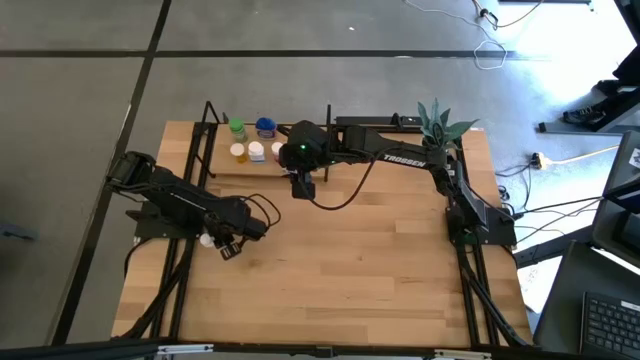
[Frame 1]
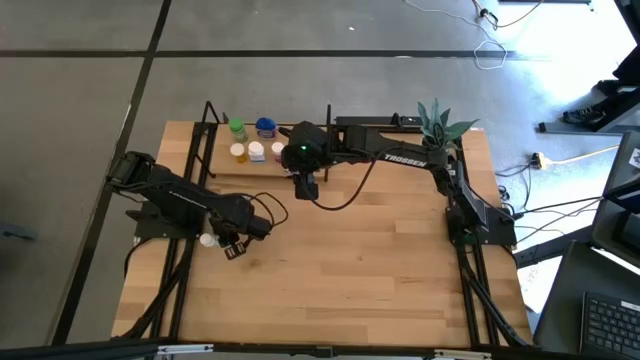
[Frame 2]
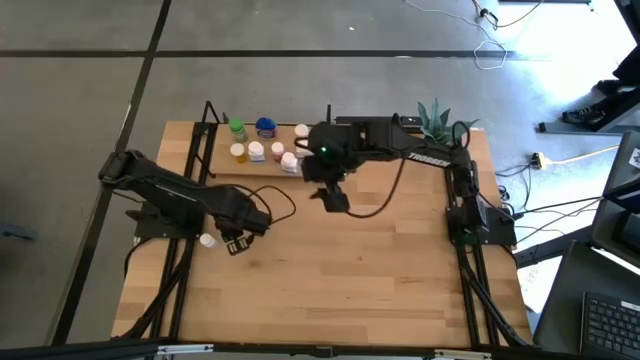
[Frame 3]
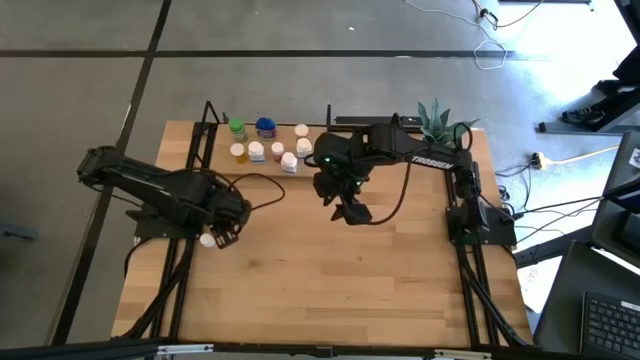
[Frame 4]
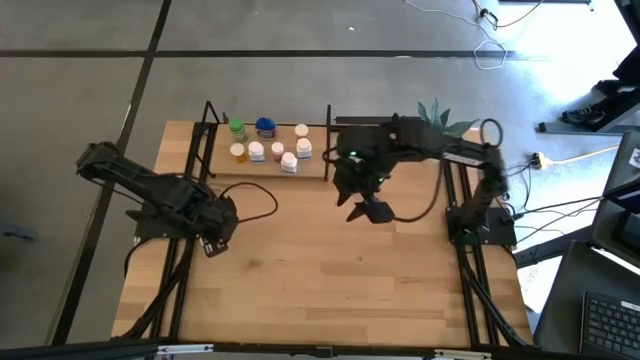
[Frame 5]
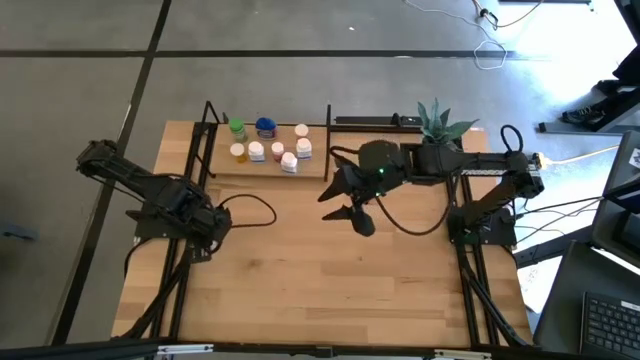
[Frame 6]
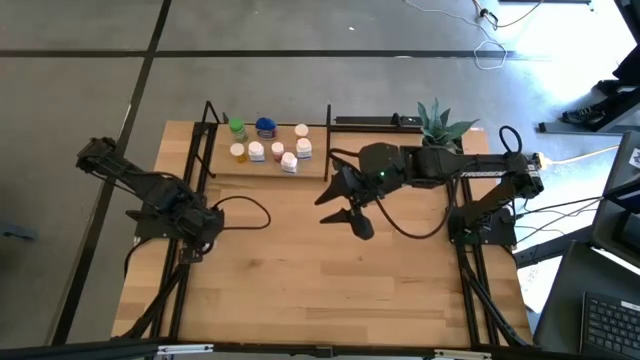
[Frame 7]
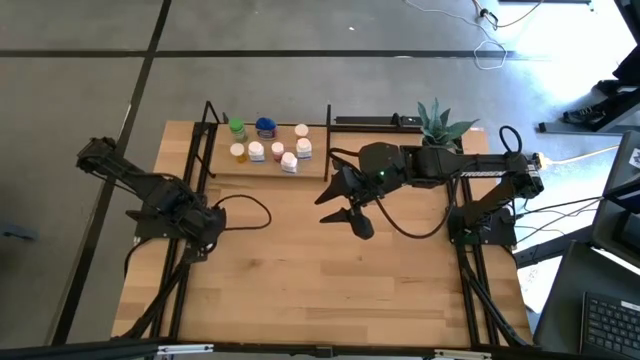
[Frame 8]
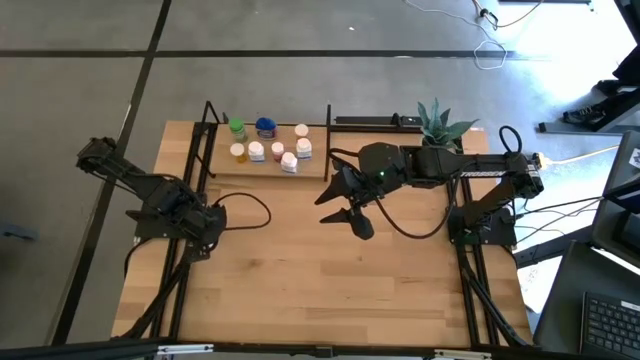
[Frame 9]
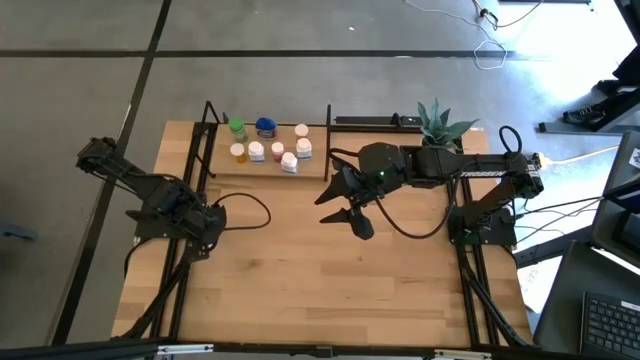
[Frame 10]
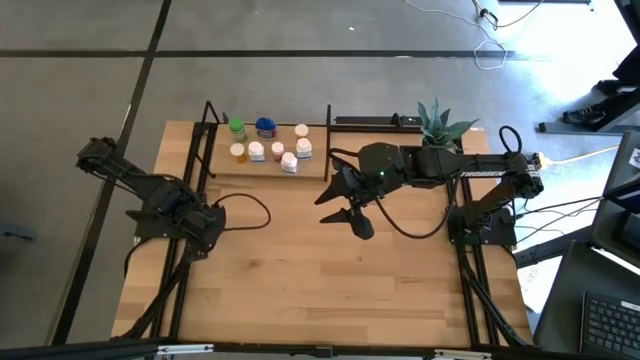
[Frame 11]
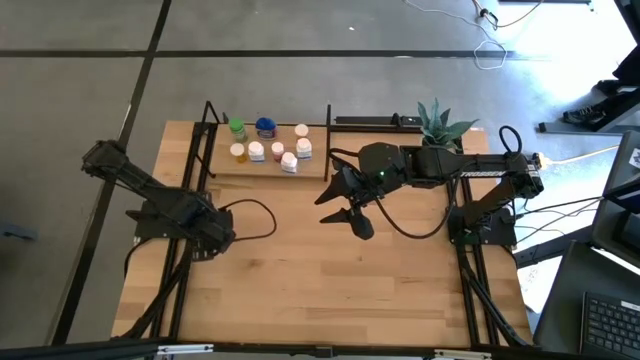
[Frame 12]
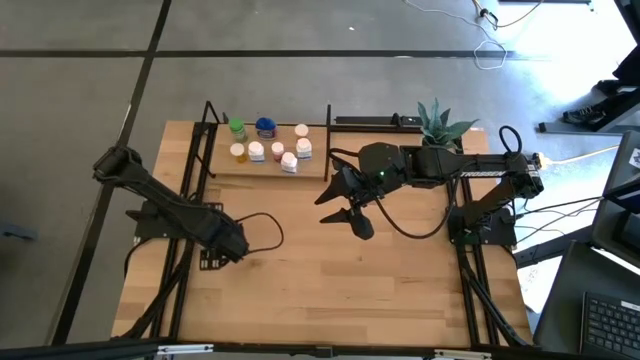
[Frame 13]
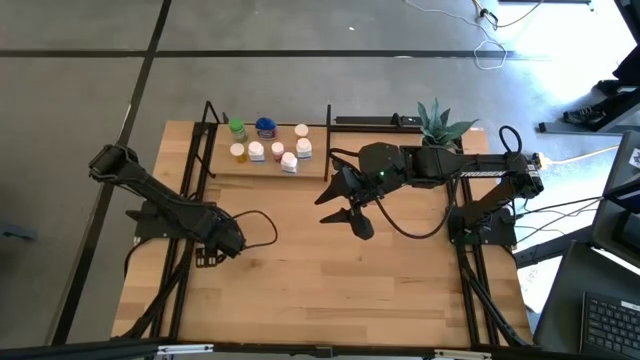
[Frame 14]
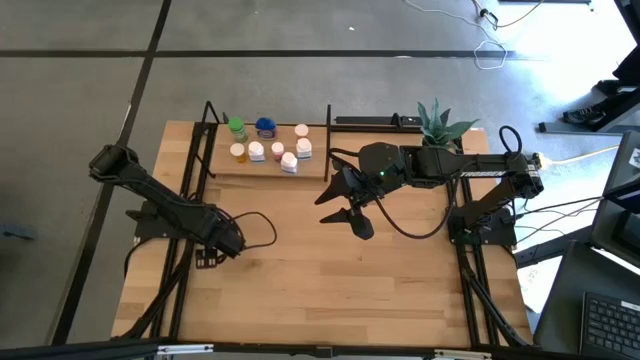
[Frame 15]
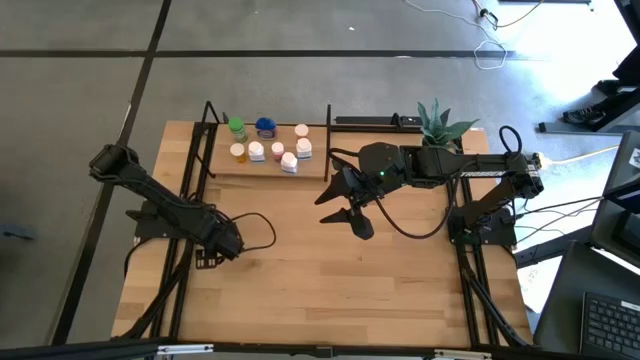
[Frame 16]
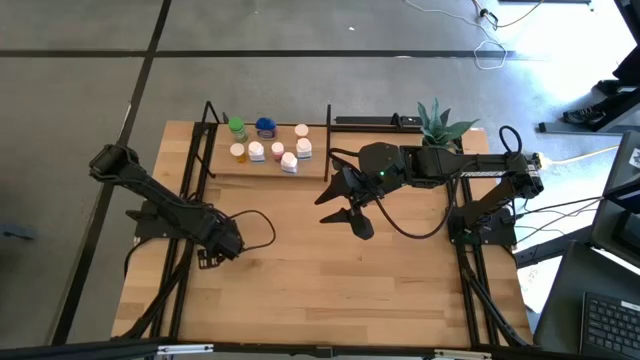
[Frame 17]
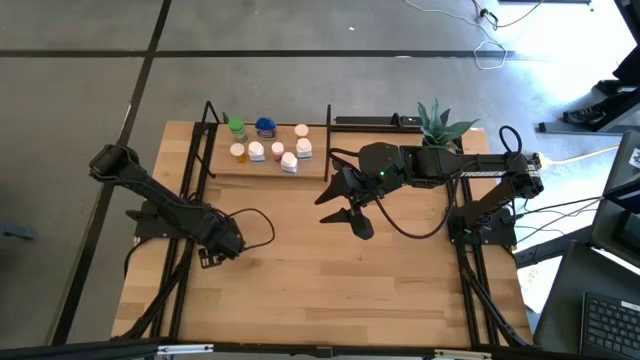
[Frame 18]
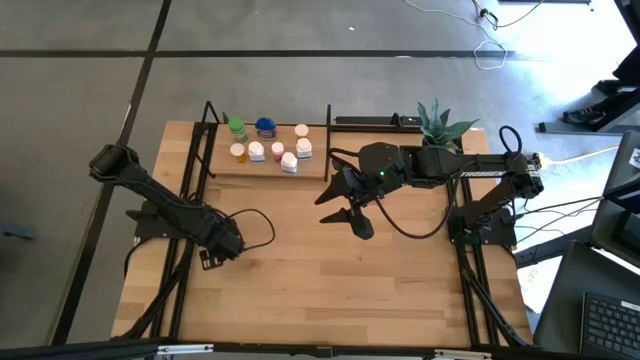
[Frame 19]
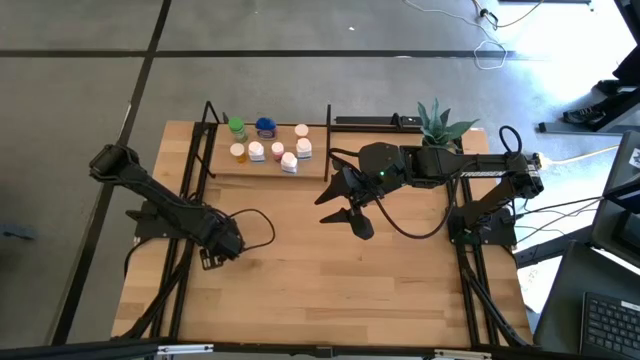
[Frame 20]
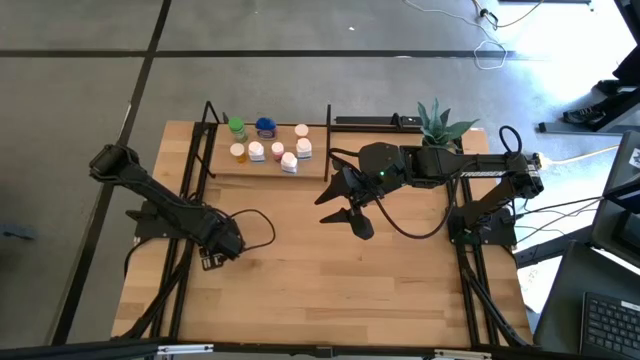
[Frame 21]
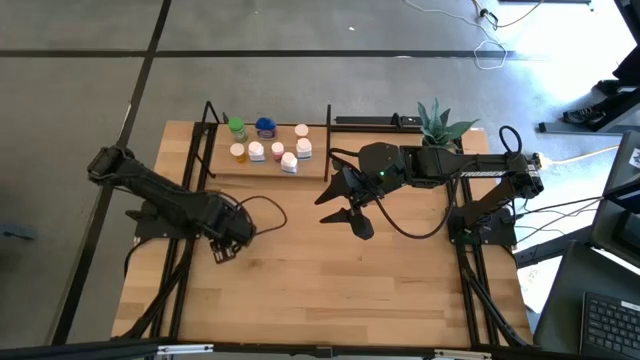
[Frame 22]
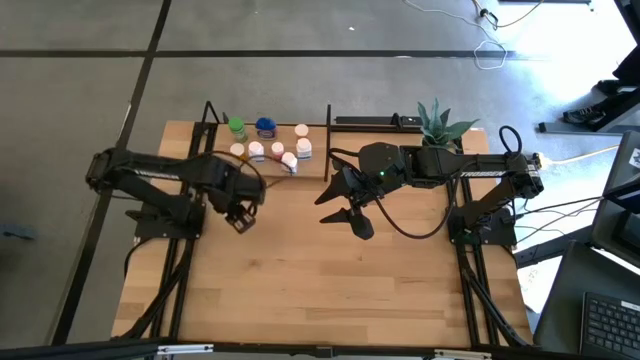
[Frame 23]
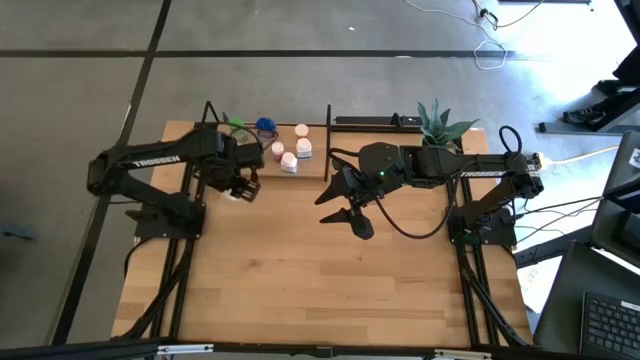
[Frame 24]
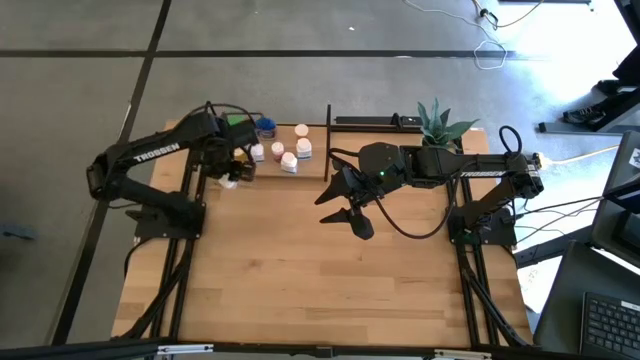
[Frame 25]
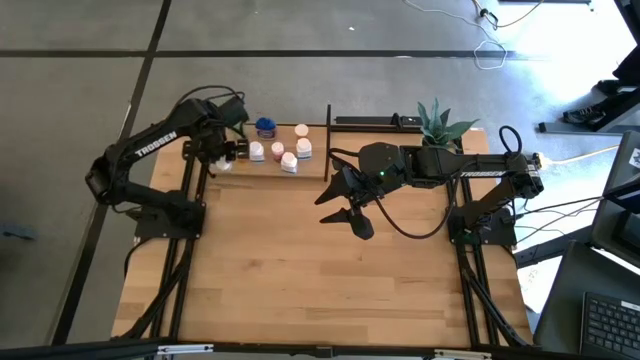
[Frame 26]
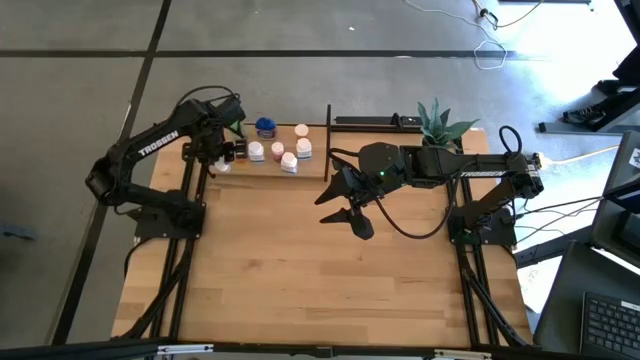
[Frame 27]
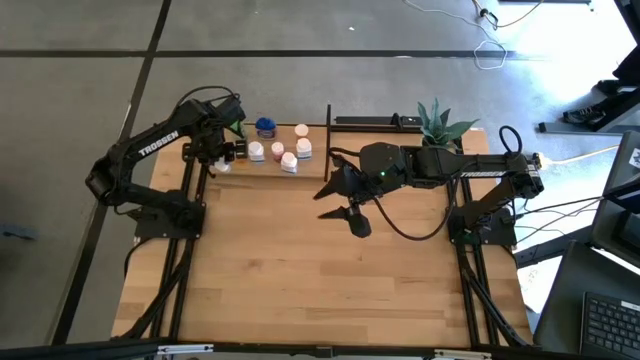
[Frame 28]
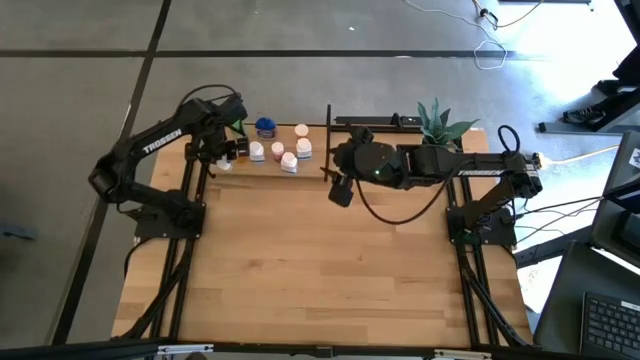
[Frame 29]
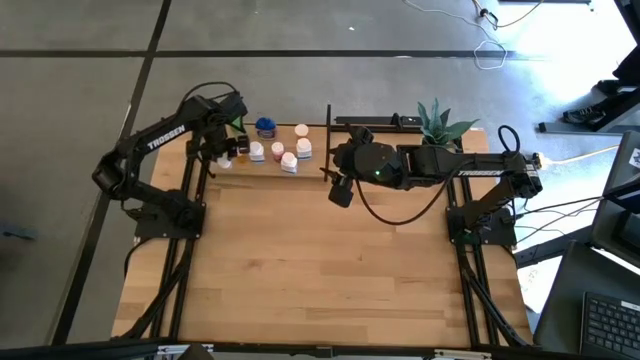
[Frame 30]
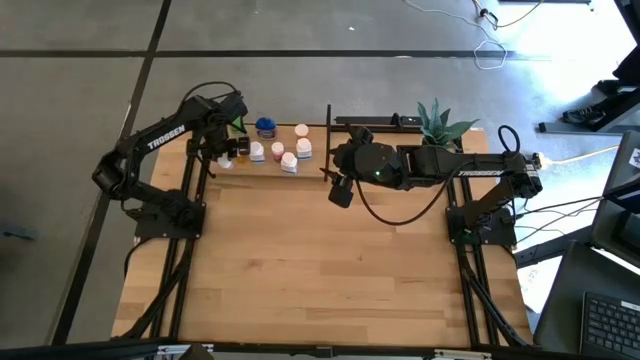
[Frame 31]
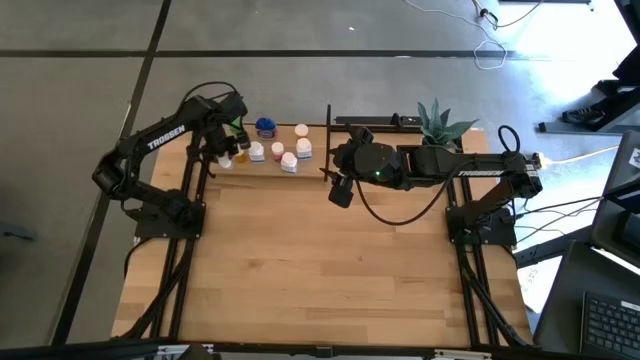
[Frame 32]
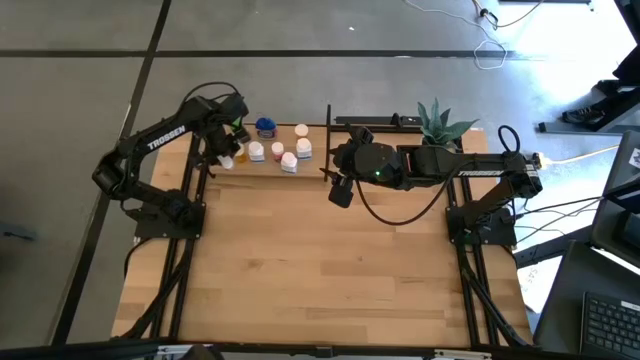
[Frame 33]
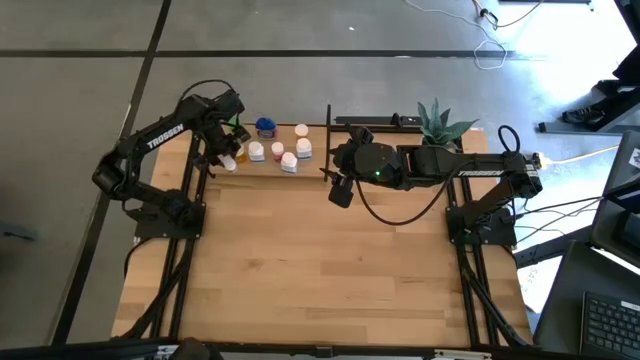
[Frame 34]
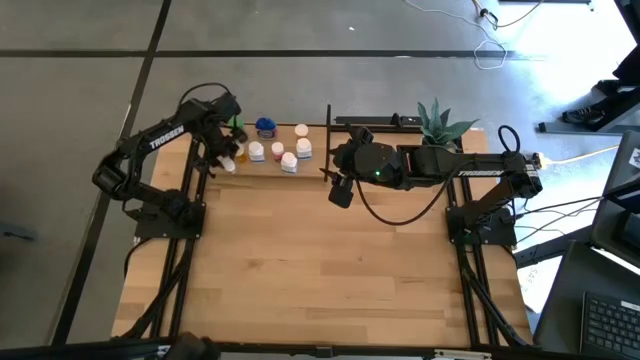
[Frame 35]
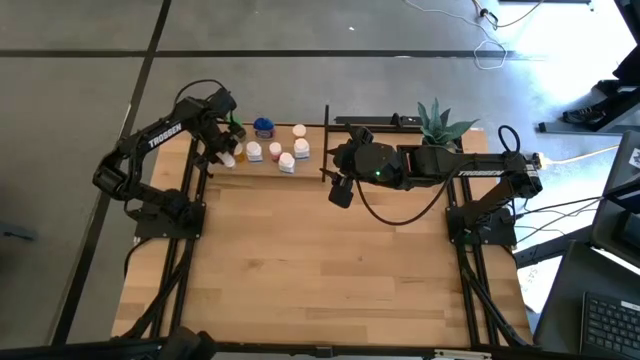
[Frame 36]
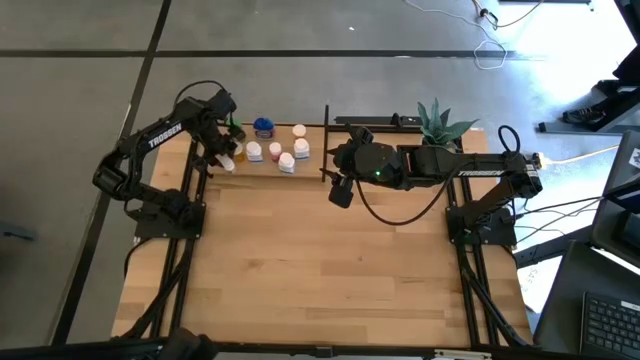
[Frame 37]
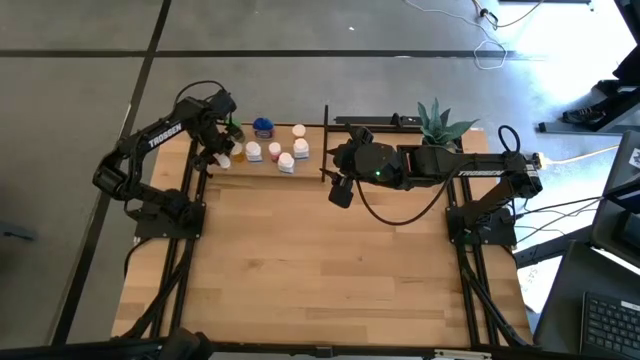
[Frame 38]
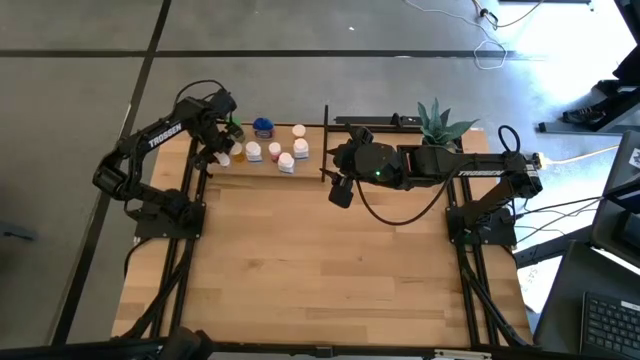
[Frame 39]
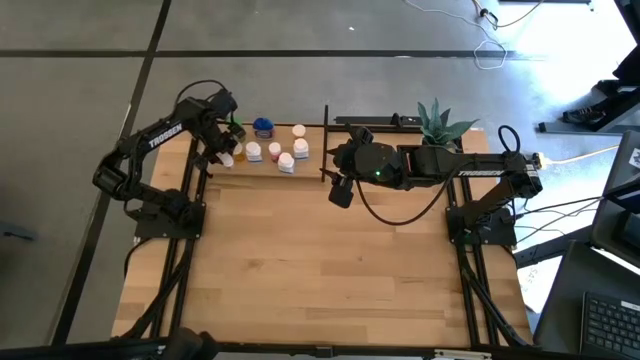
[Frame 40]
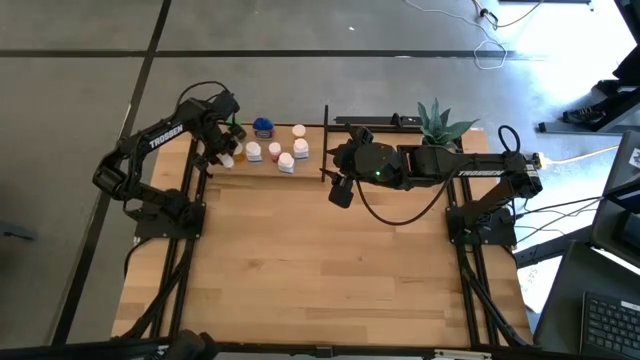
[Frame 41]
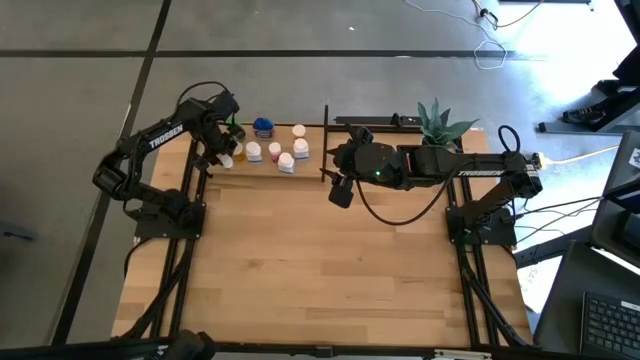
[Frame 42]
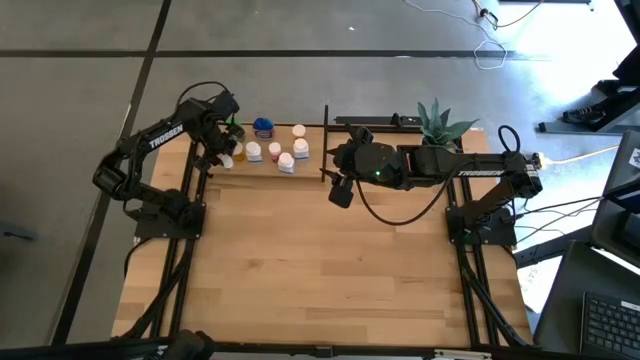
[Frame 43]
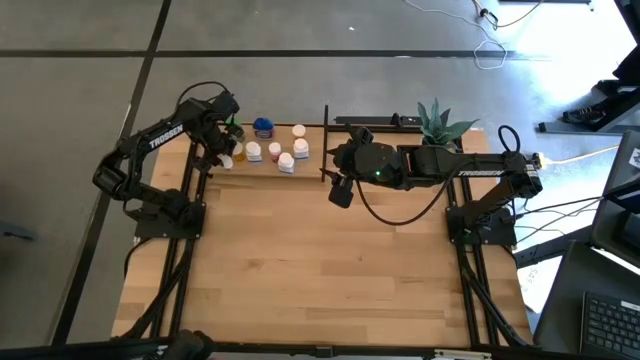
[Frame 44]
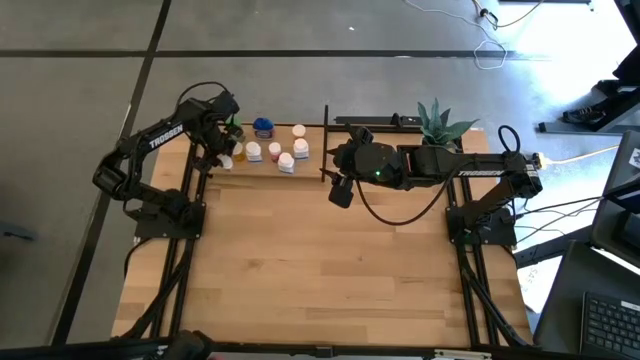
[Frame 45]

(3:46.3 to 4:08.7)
Task: Pick and place medicine bottles onto shelf by color
Put the white black pill bottle on the shelf
